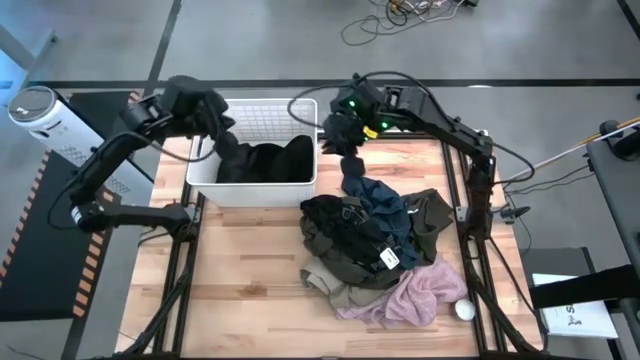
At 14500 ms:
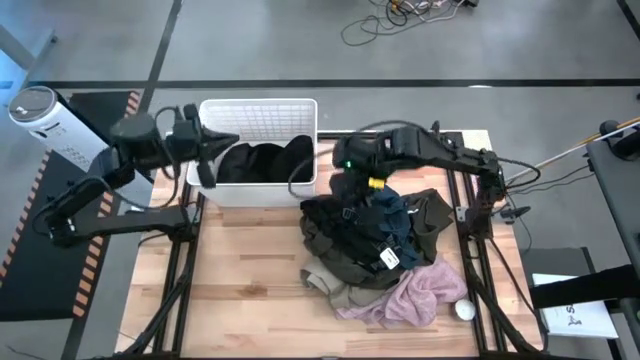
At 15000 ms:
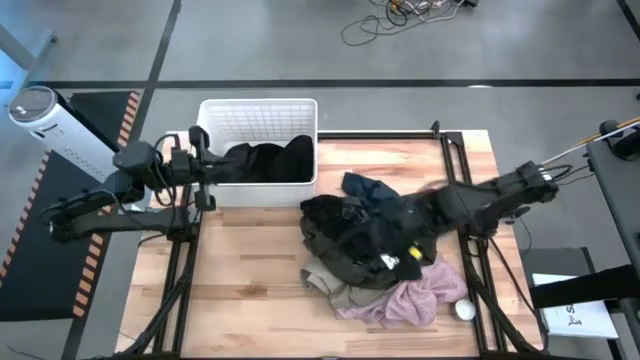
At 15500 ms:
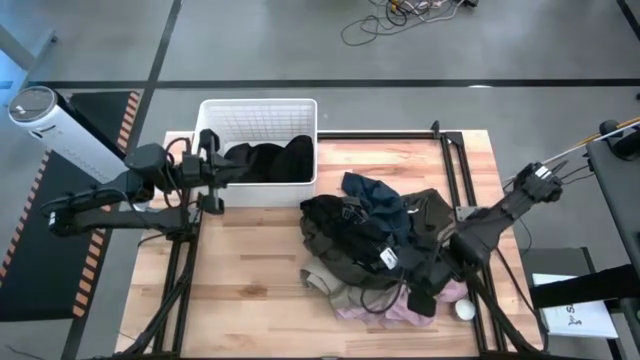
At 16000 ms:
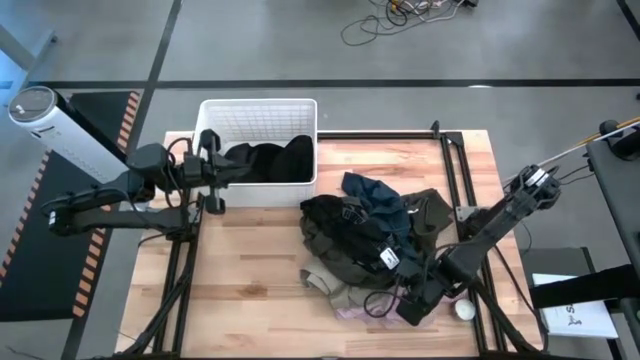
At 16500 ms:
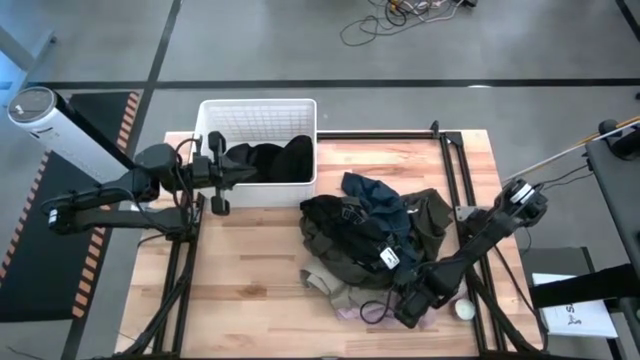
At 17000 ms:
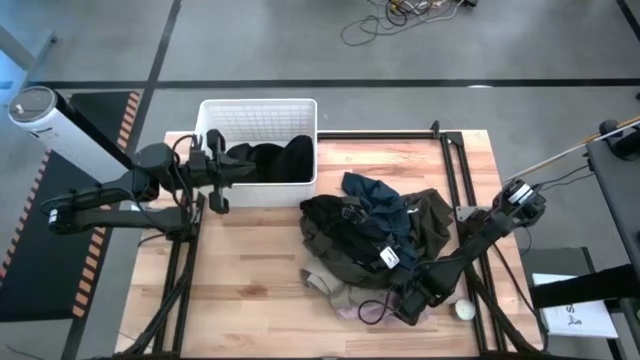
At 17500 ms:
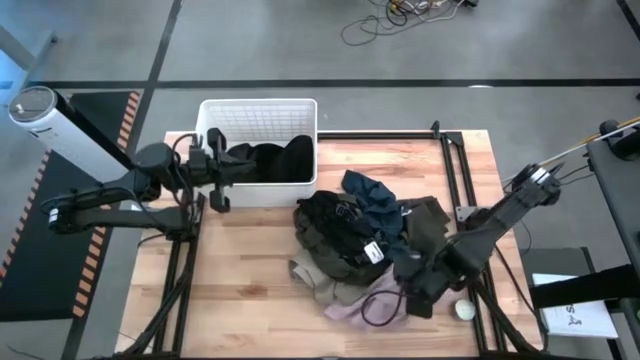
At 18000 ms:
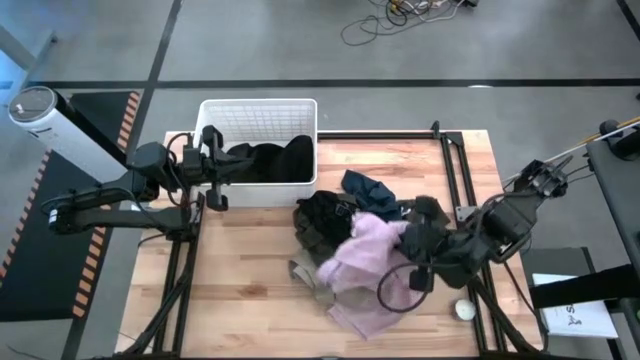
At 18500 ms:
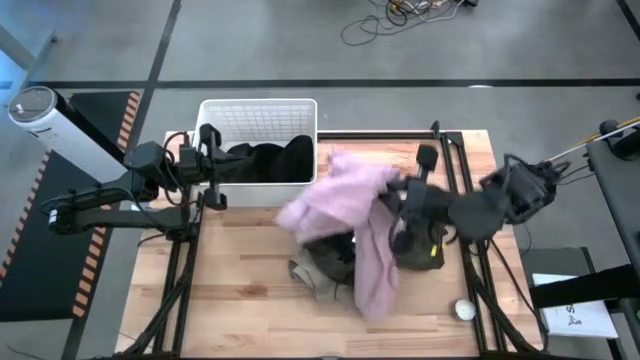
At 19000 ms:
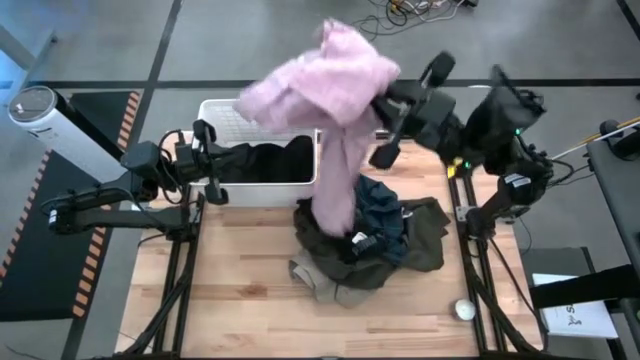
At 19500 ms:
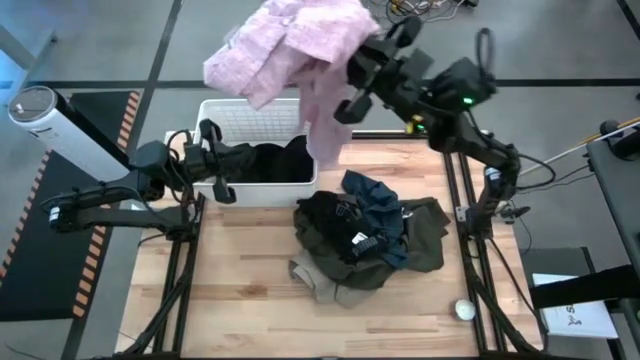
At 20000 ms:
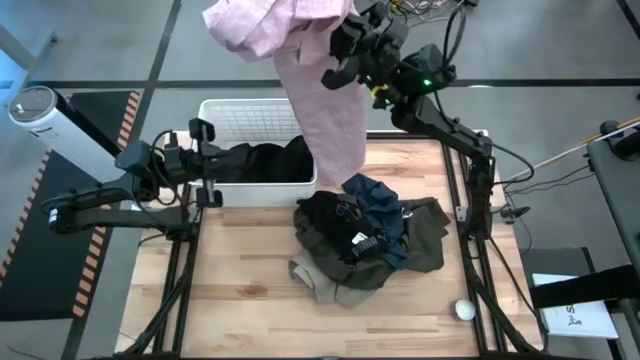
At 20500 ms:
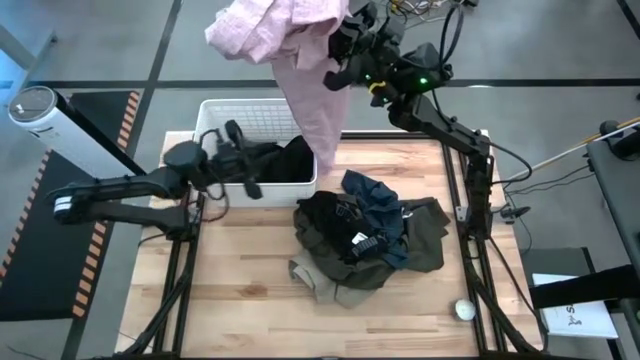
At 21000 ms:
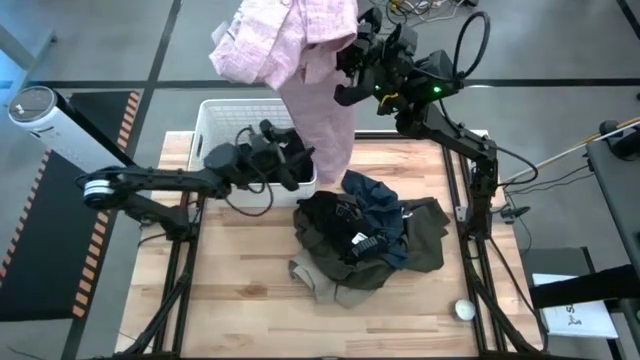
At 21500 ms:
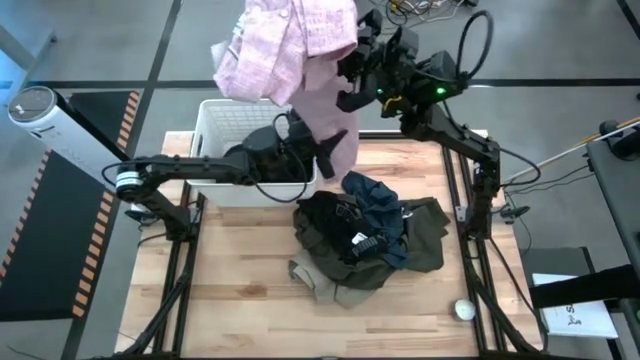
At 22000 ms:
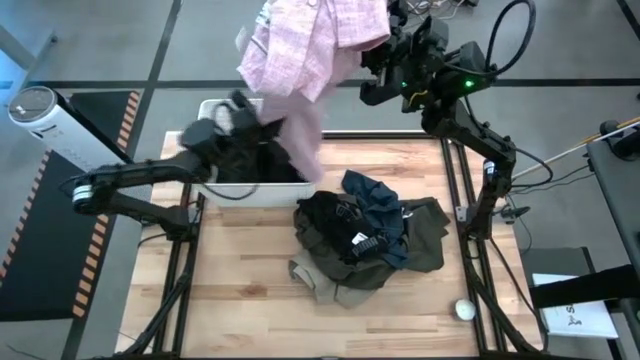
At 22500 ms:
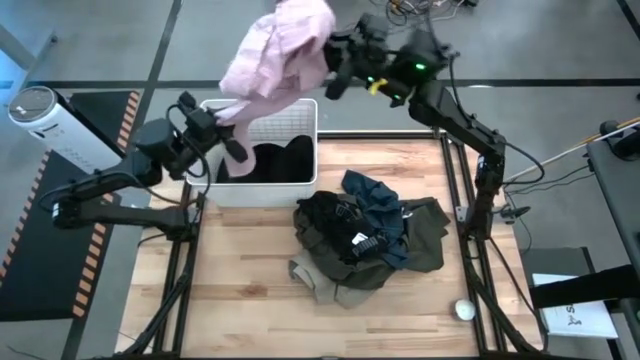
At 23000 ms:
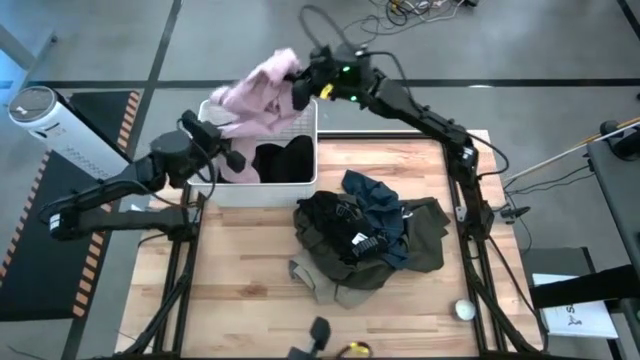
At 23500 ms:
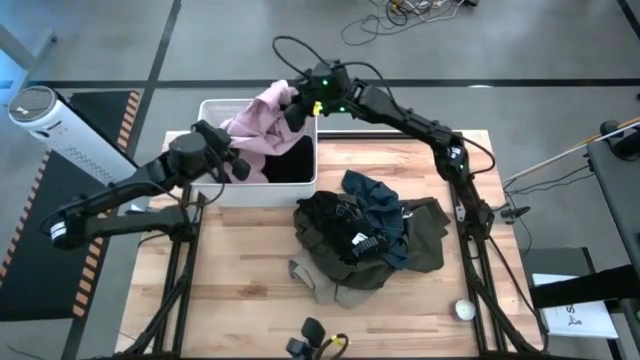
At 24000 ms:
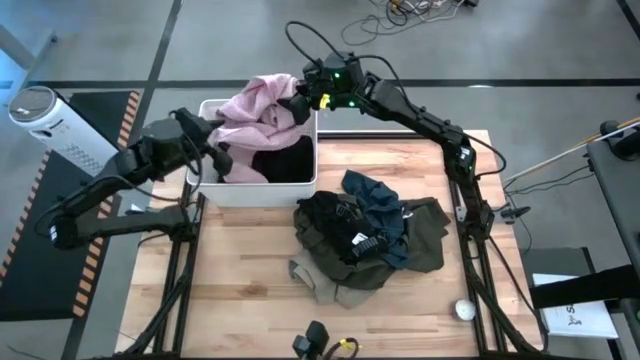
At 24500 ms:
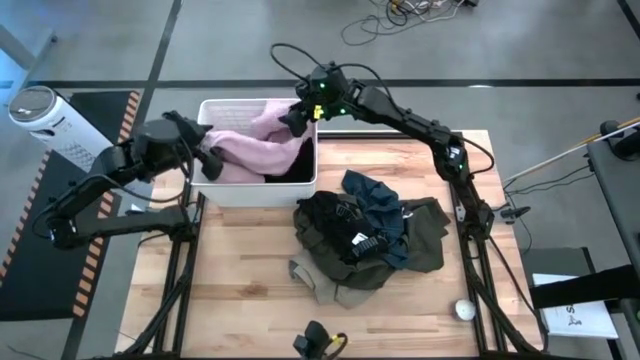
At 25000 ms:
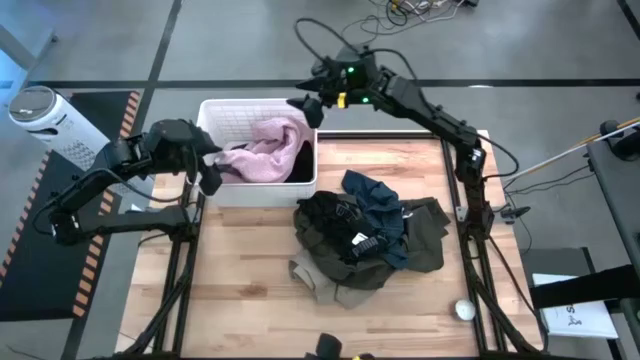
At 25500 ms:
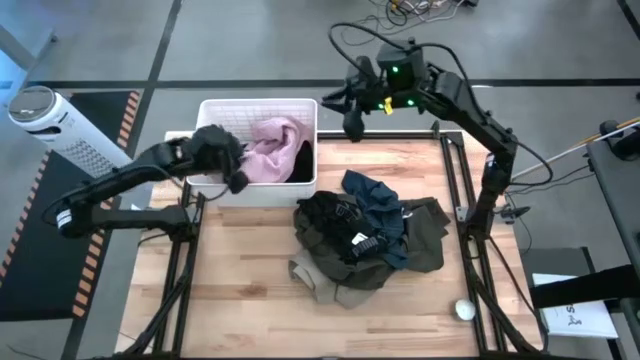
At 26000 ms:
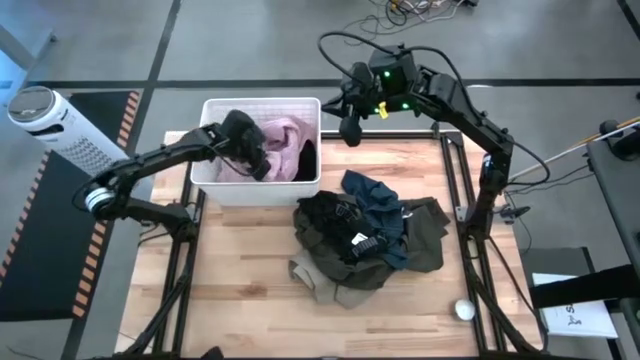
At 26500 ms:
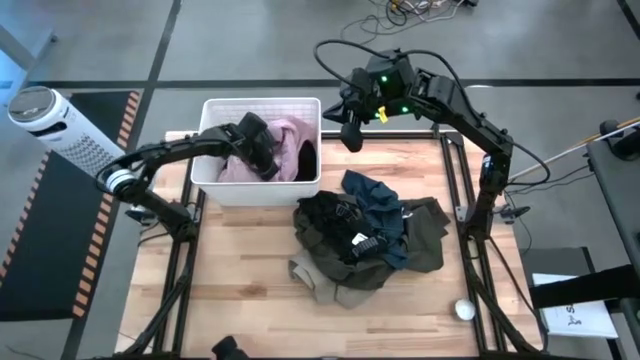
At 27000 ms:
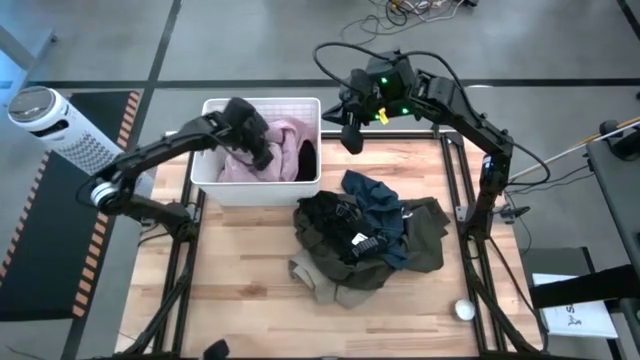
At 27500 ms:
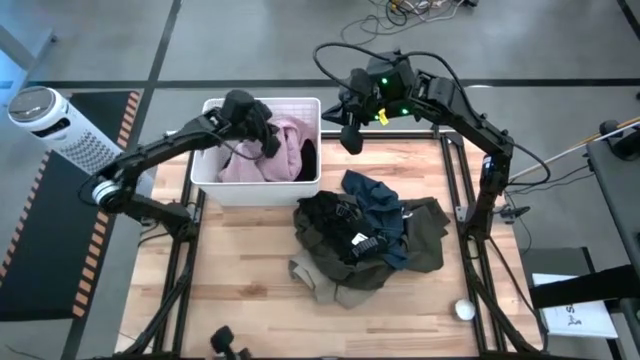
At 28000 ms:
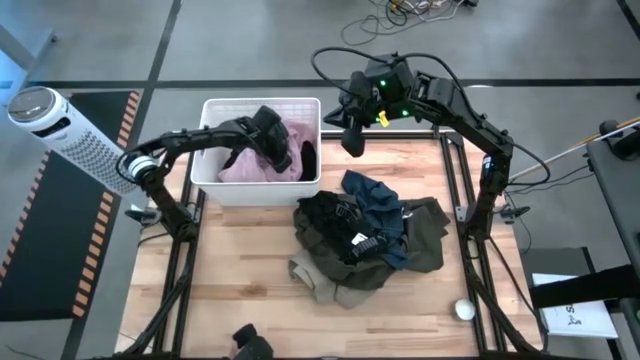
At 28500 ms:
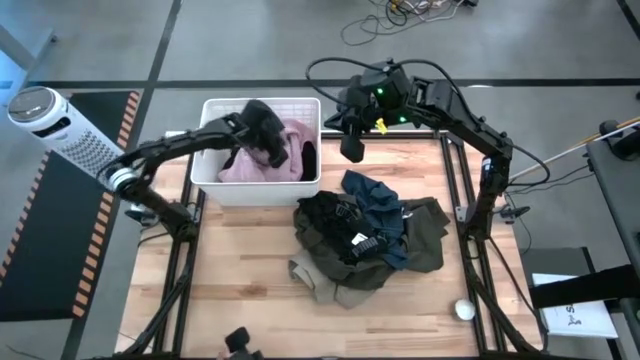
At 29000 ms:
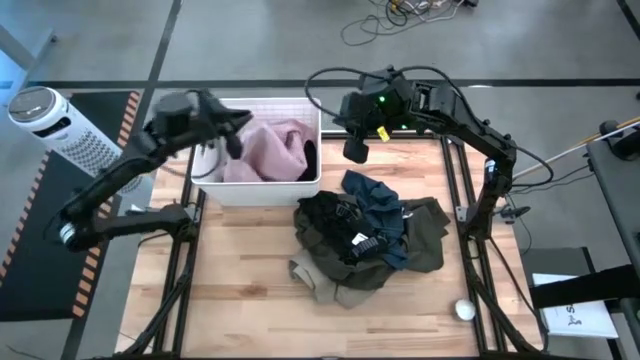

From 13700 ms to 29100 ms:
Task: Sort clothes
Put the pink shirt into the white bin

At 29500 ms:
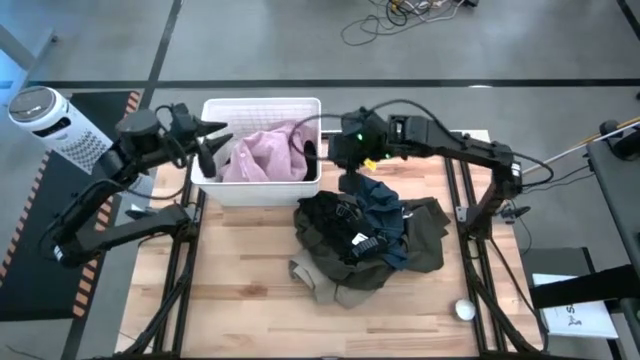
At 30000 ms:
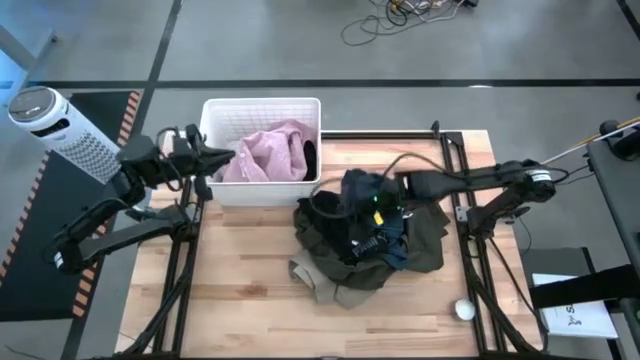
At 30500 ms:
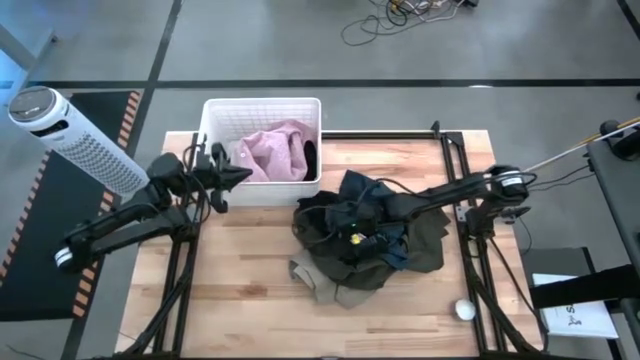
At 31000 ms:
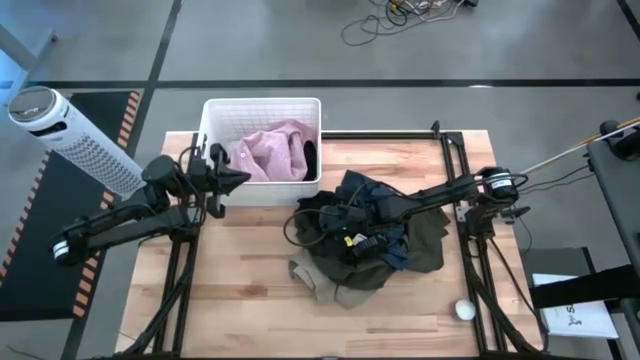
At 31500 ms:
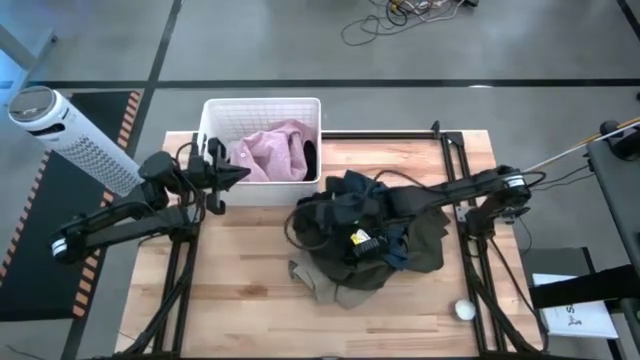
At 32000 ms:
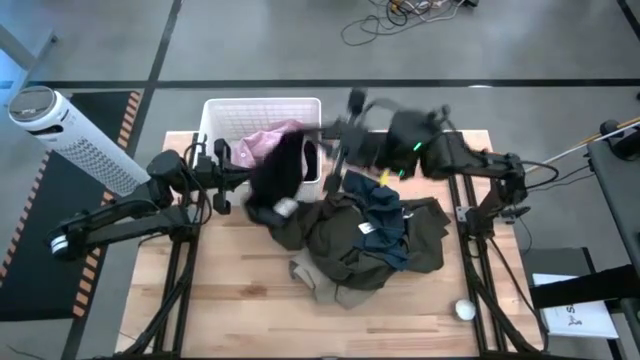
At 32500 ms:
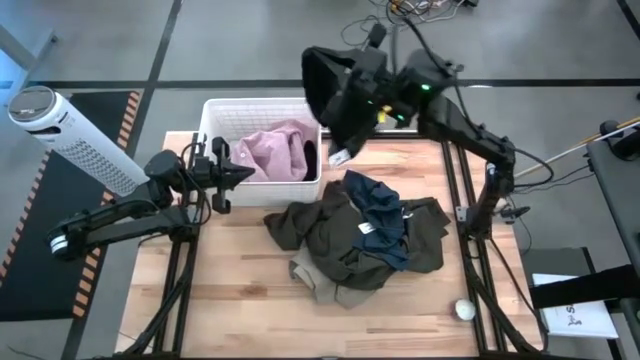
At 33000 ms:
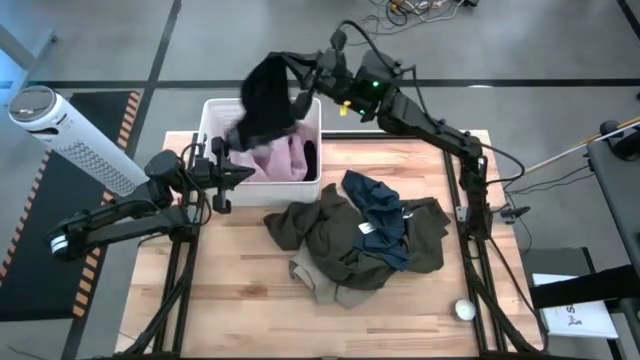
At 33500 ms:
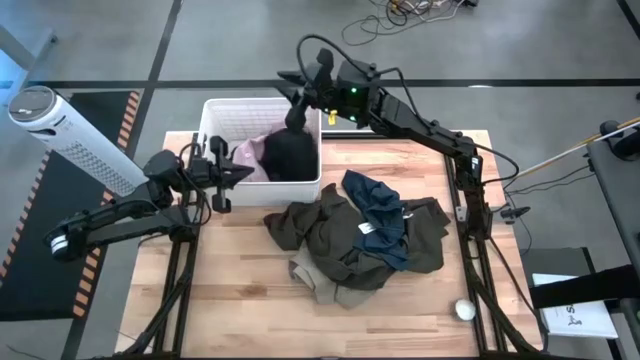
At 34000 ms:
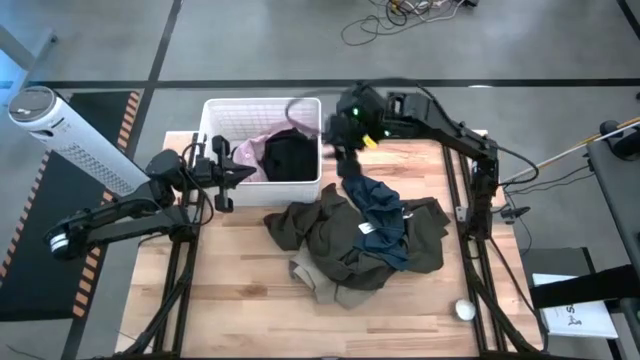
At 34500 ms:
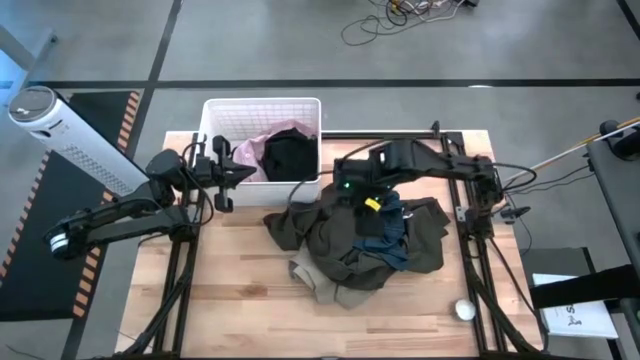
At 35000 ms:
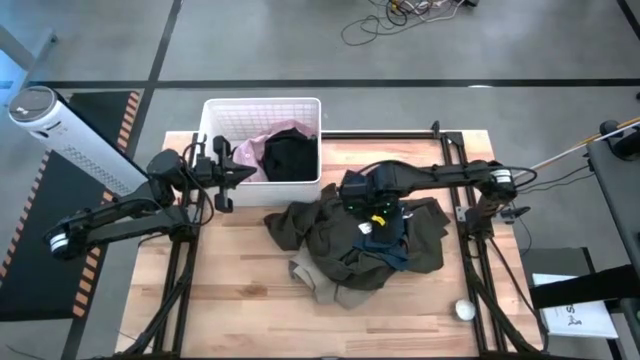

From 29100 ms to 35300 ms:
Put the black boxer into the white bin
